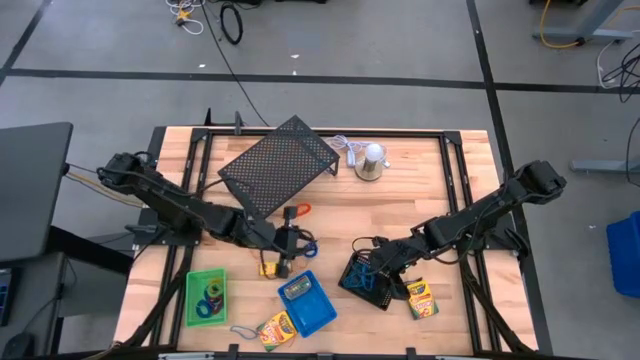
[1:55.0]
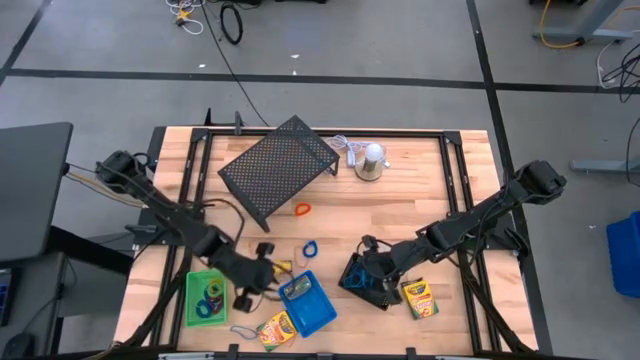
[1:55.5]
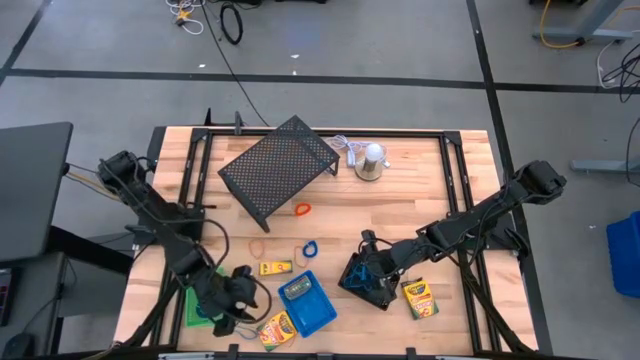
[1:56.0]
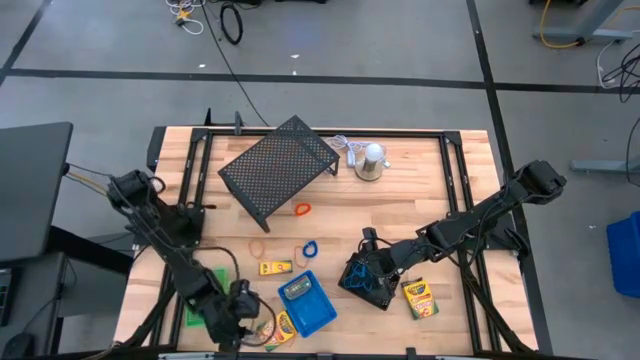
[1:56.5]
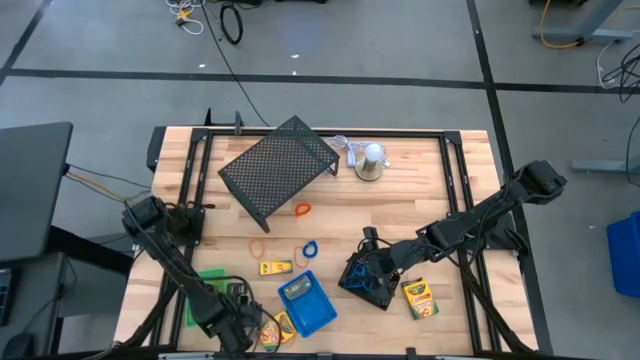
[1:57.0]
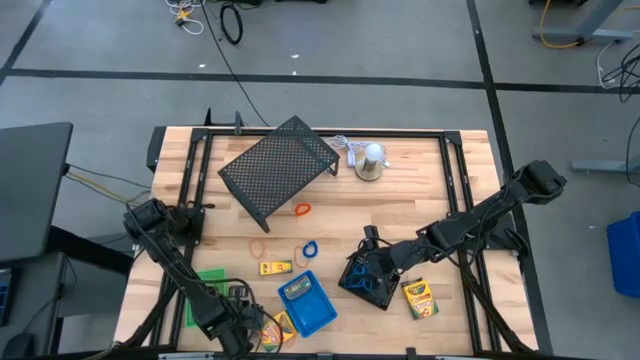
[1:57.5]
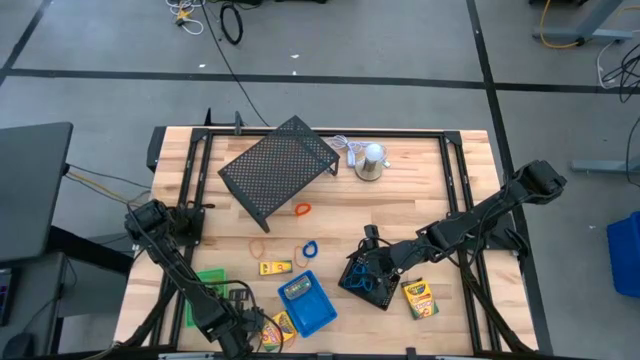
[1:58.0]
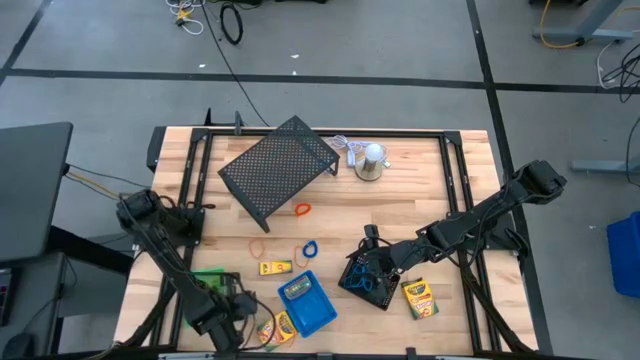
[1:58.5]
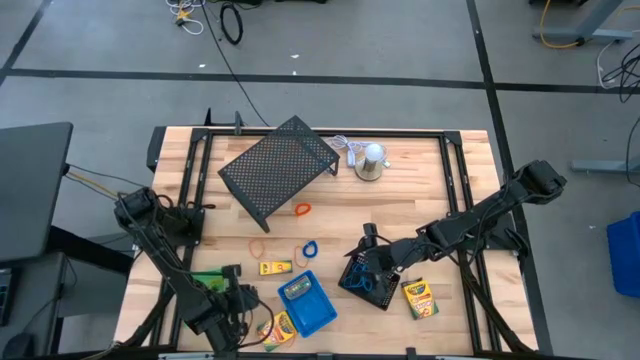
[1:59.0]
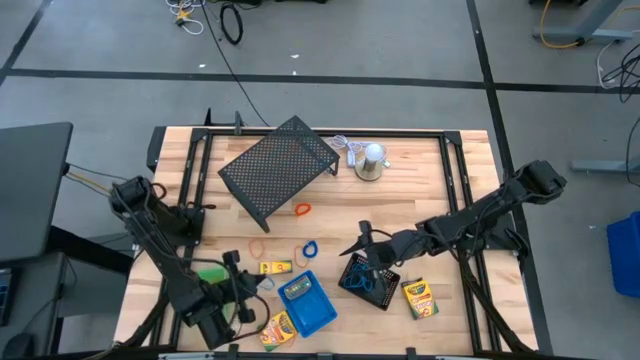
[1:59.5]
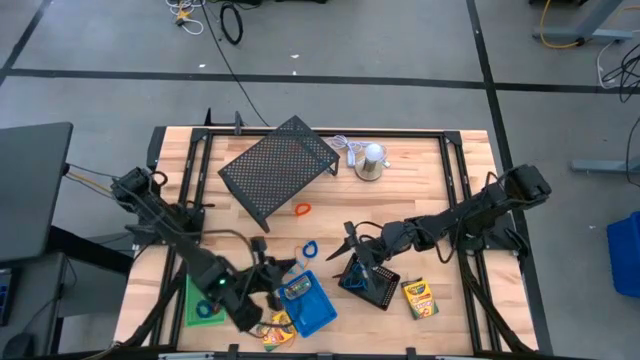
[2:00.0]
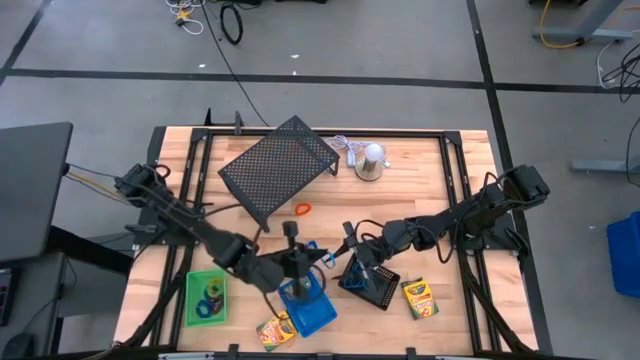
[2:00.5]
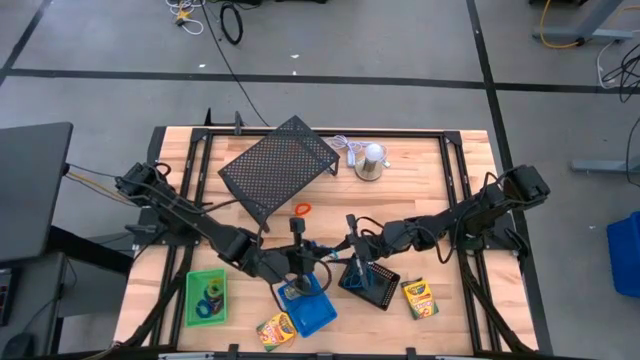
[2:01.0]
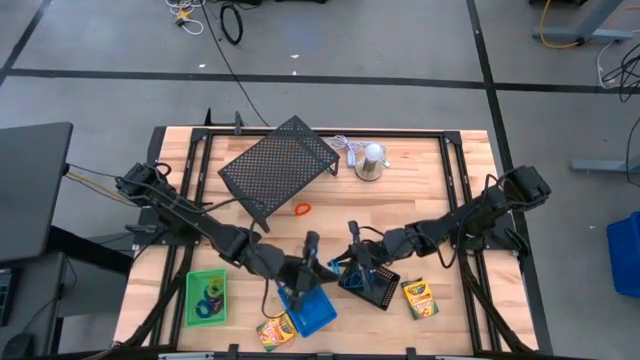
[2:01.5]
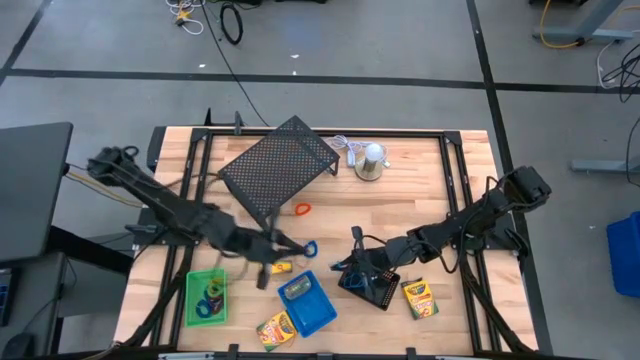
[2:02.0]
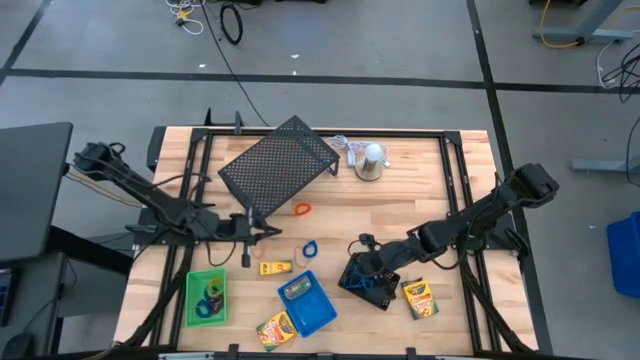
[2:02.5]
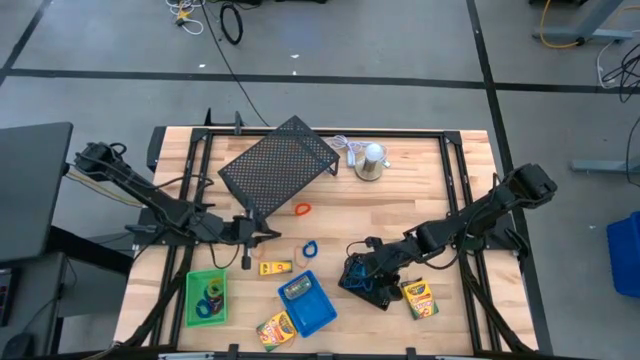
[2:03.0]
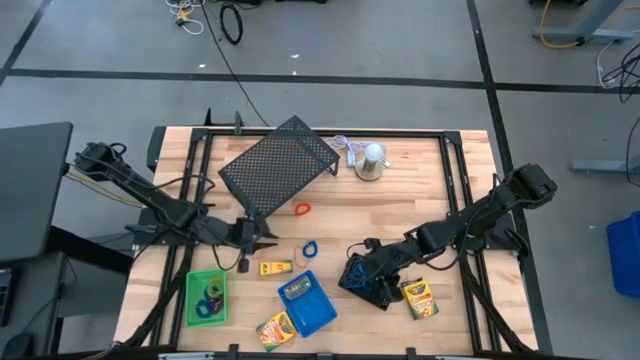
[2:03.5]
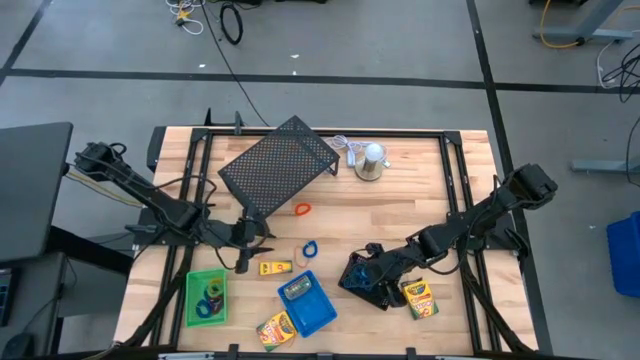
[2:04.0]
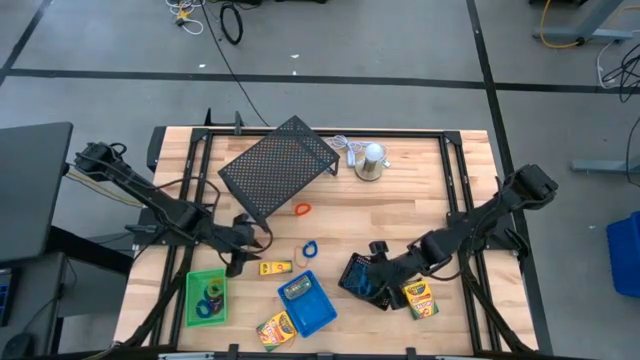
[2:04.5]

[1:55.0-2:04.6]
Task: Pick & Place Office Desk Supplies
Put the blue rubber band into the black bin

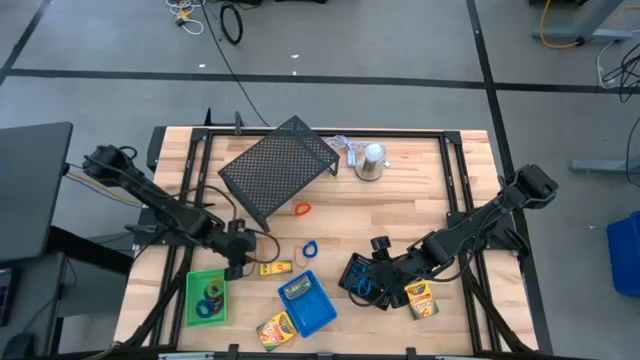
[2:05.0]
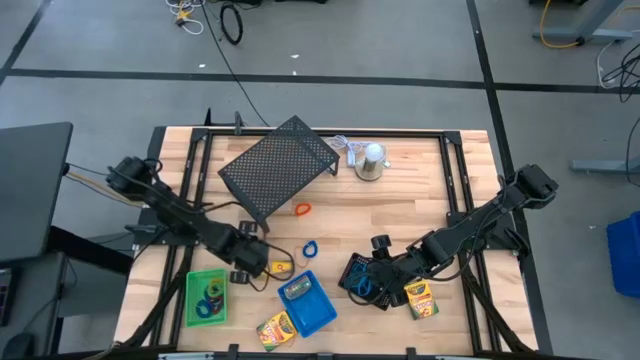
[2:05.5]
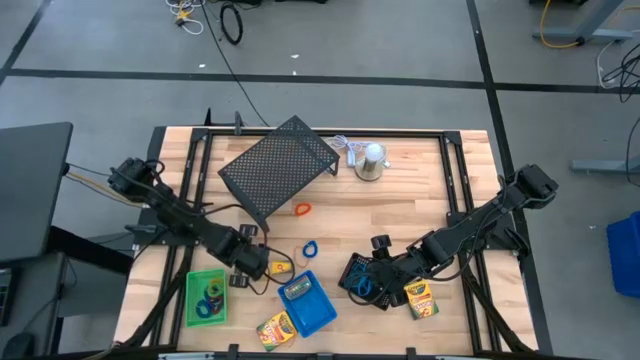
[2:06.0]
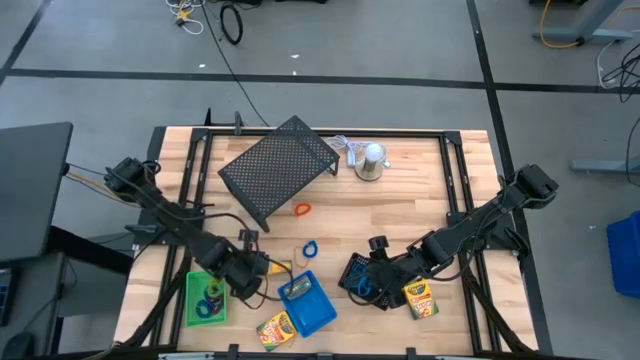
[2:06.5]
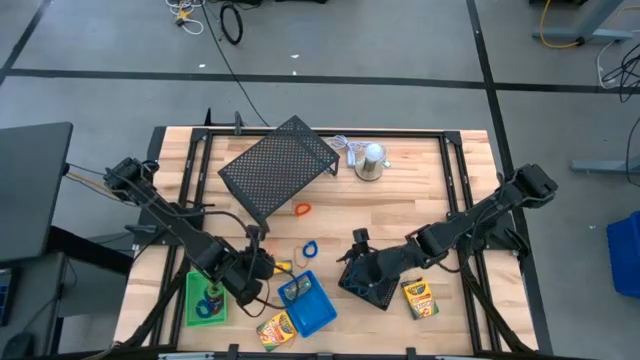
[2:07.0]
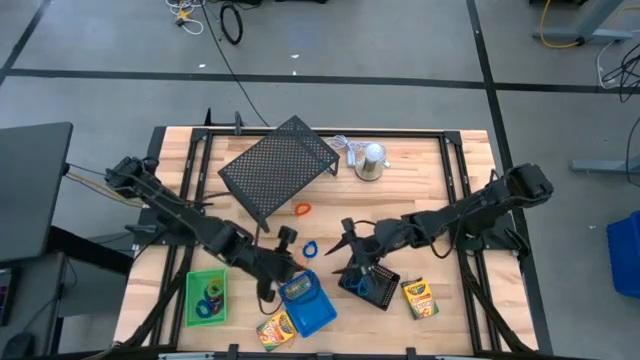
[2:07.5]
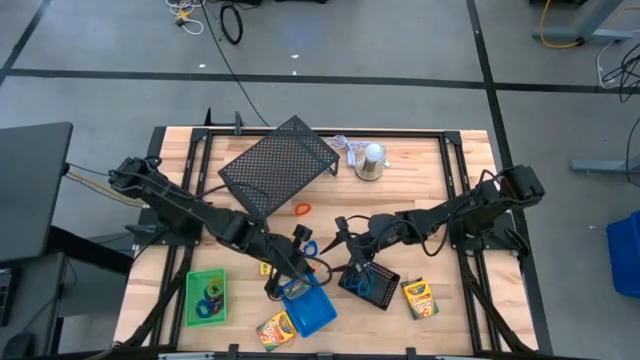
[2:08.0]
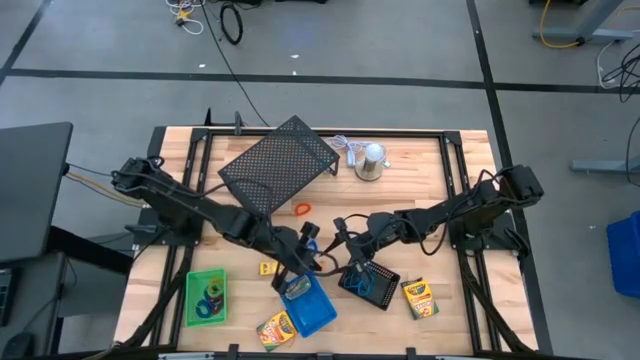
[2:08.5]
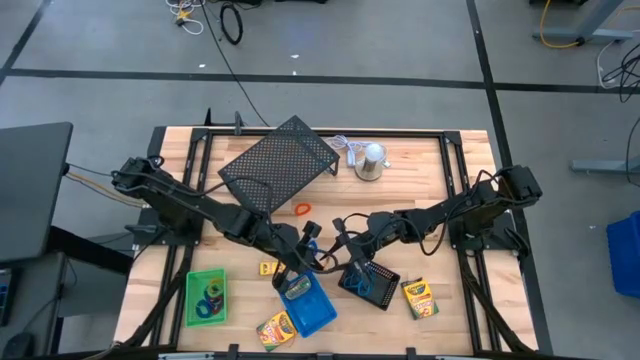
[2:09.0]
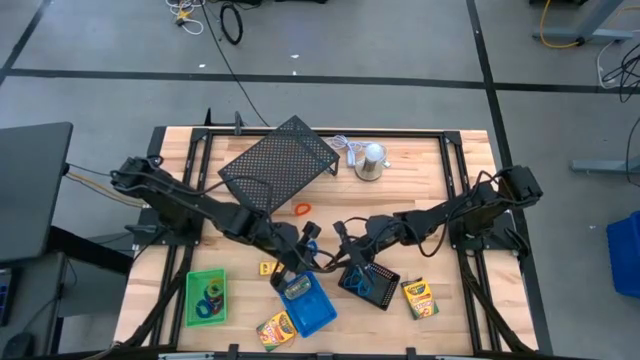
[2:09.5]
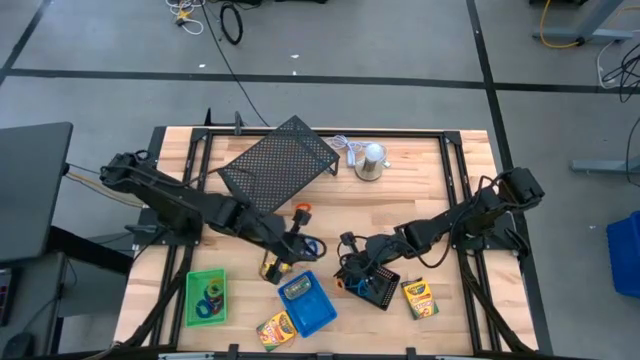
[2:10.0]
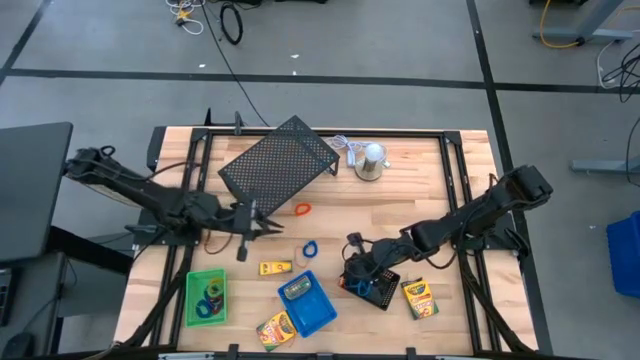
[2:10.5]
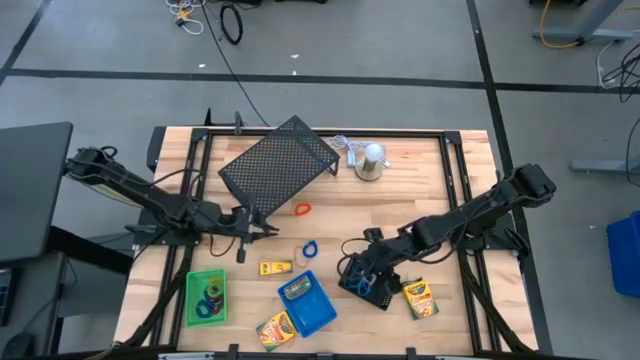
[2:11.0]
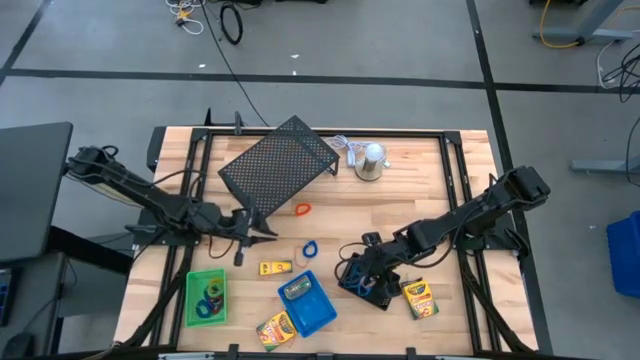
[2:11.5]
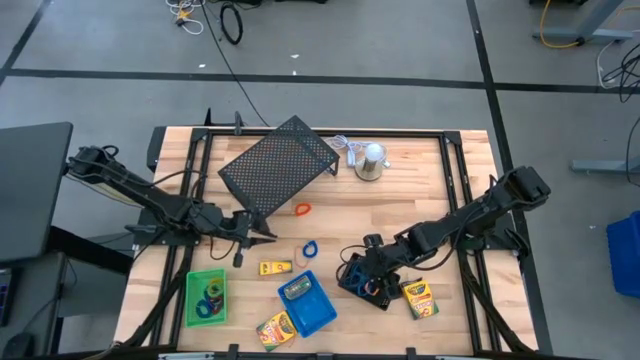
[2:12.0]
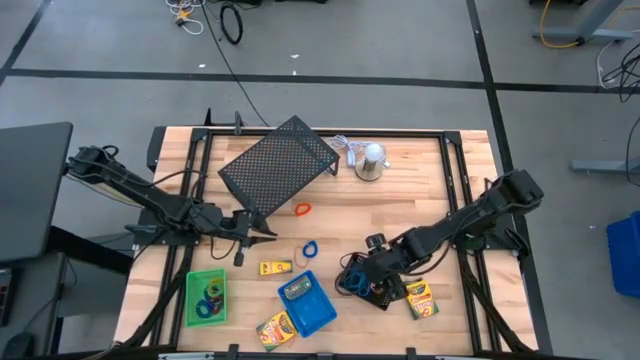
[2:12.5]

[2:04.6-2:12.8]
Put the orange rubber band into the black bin
